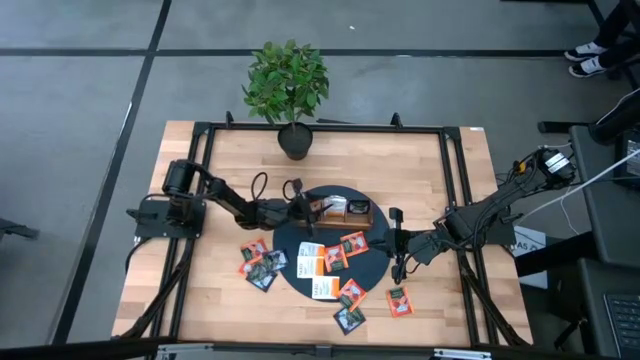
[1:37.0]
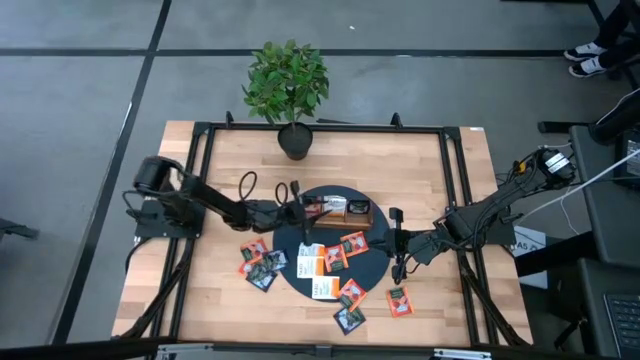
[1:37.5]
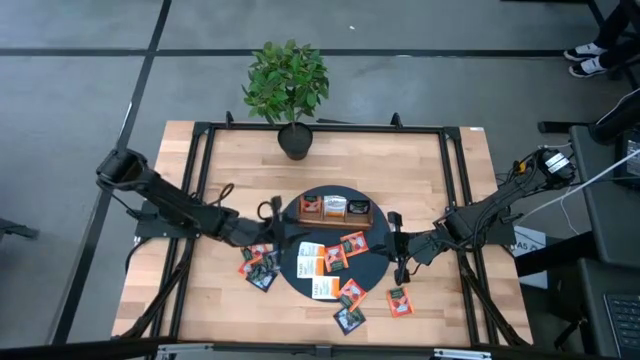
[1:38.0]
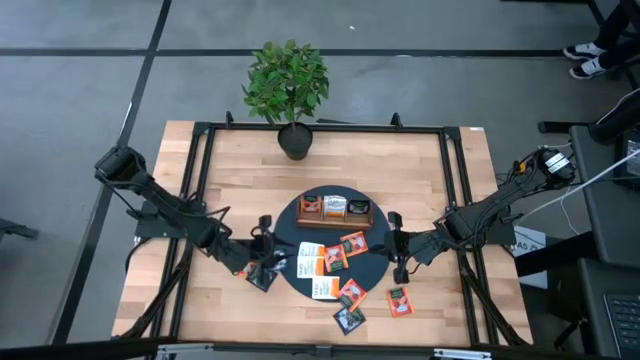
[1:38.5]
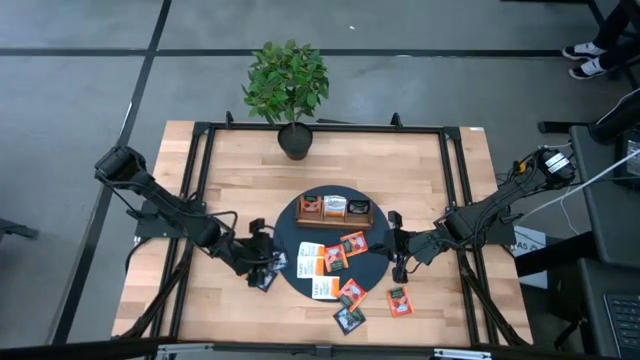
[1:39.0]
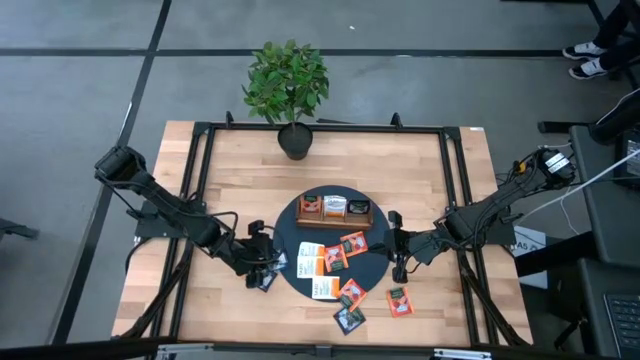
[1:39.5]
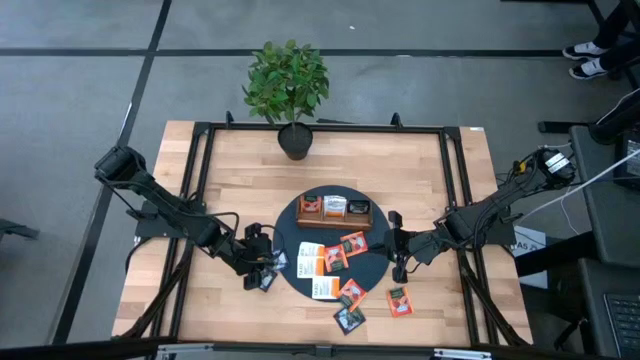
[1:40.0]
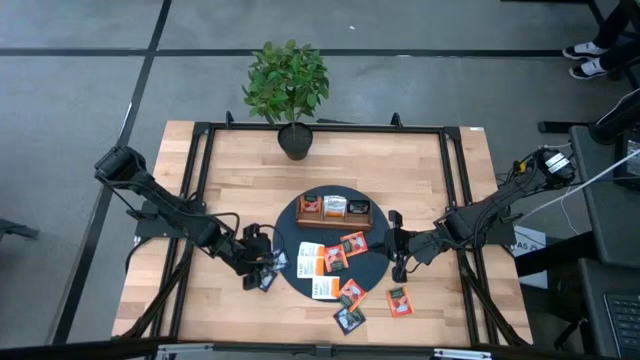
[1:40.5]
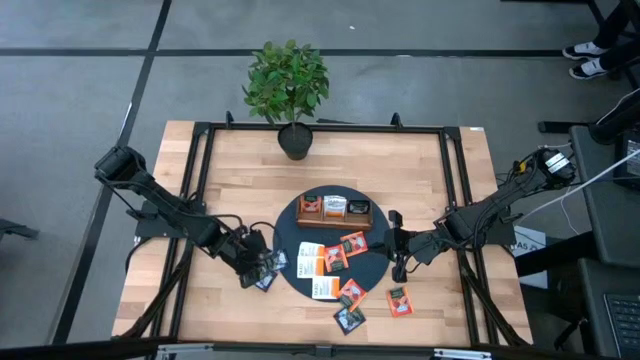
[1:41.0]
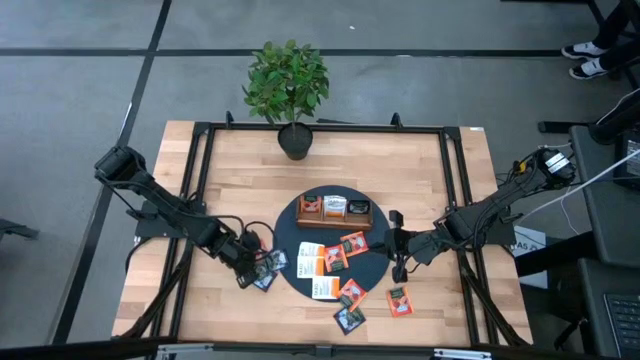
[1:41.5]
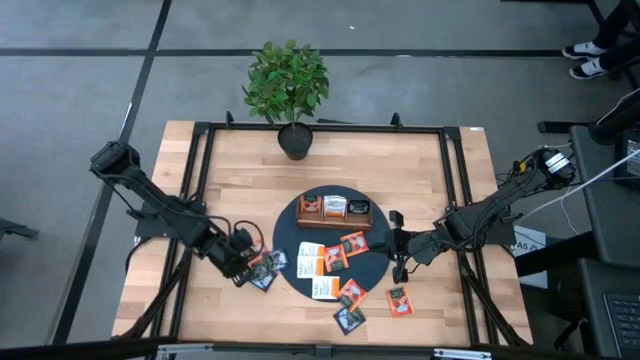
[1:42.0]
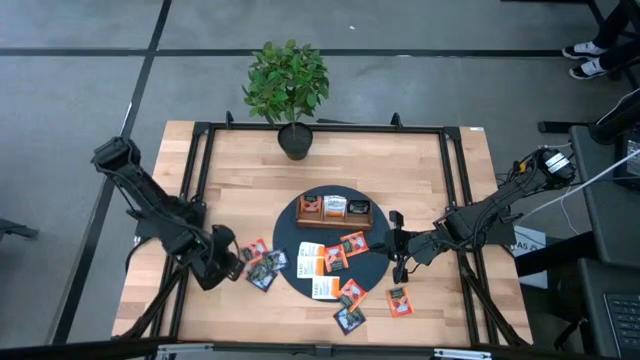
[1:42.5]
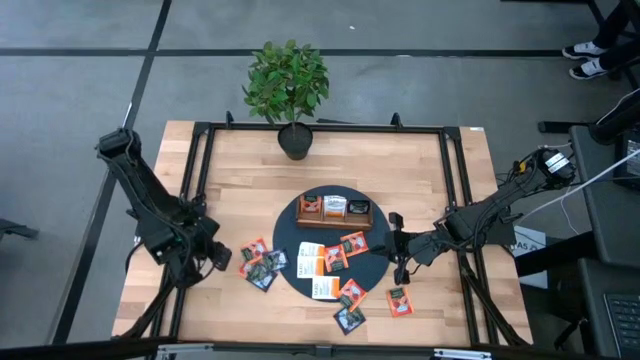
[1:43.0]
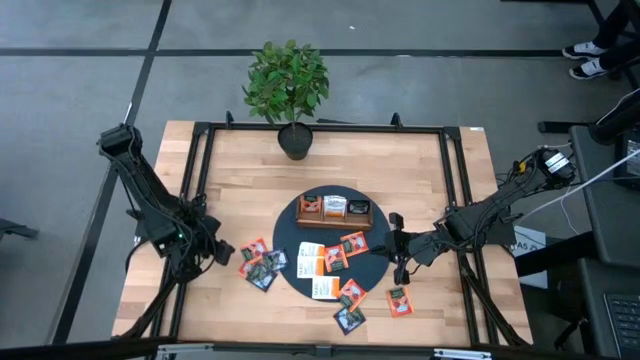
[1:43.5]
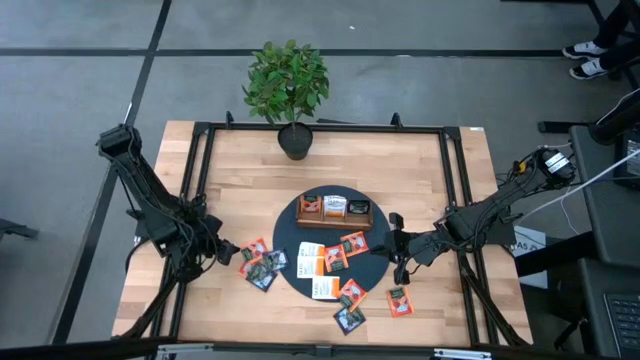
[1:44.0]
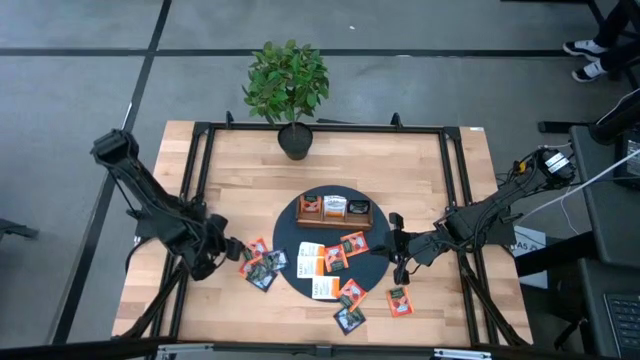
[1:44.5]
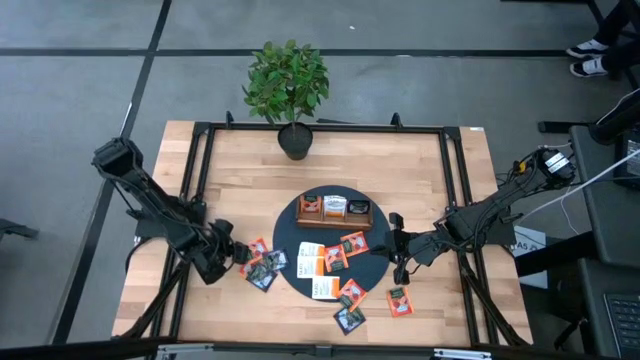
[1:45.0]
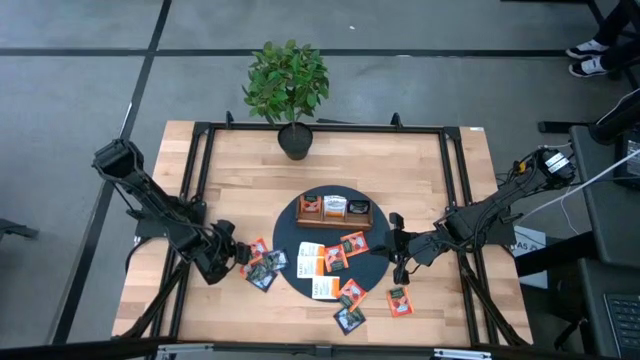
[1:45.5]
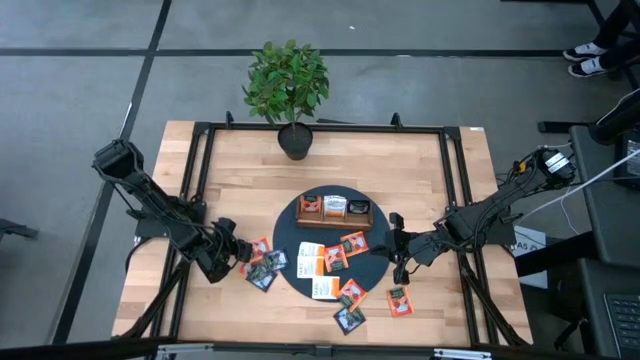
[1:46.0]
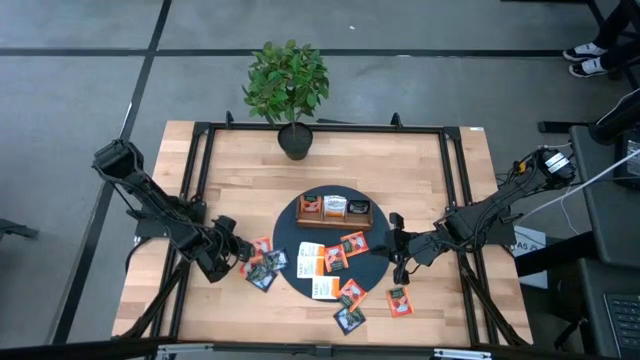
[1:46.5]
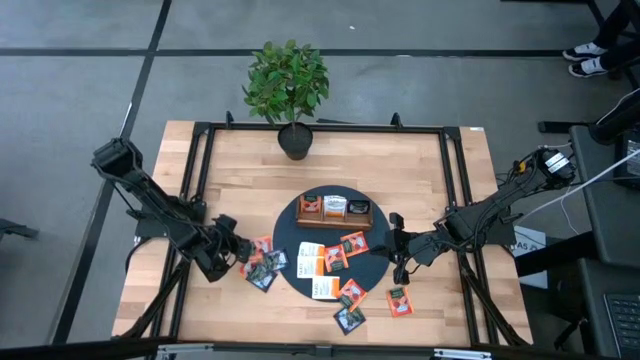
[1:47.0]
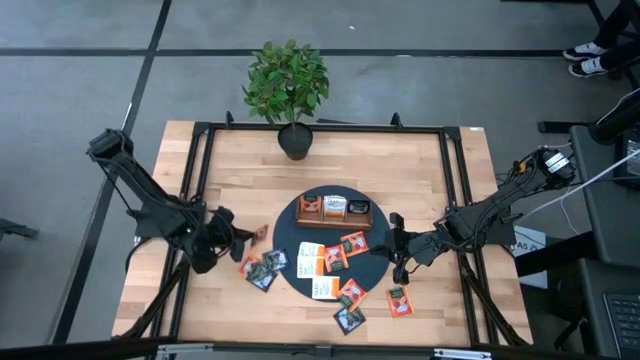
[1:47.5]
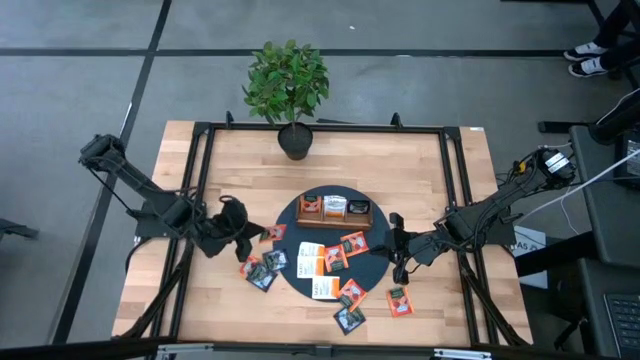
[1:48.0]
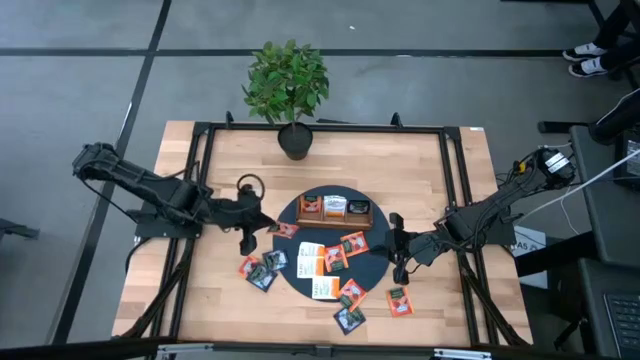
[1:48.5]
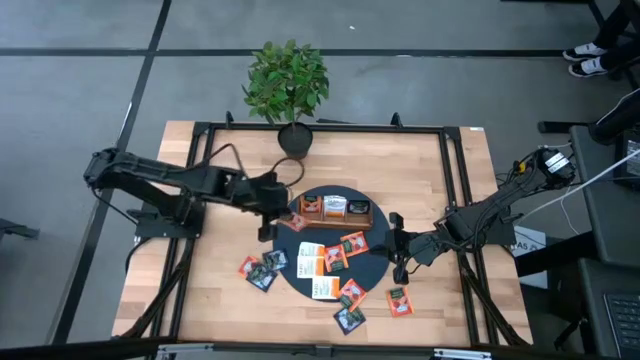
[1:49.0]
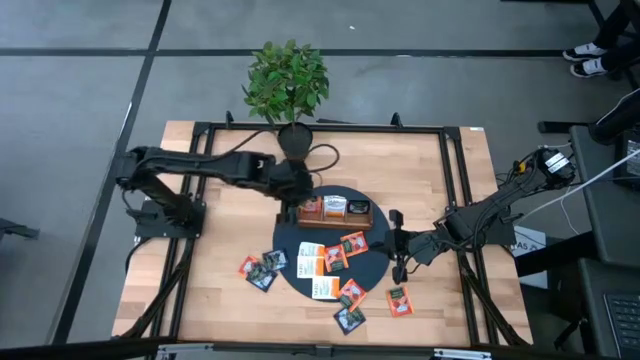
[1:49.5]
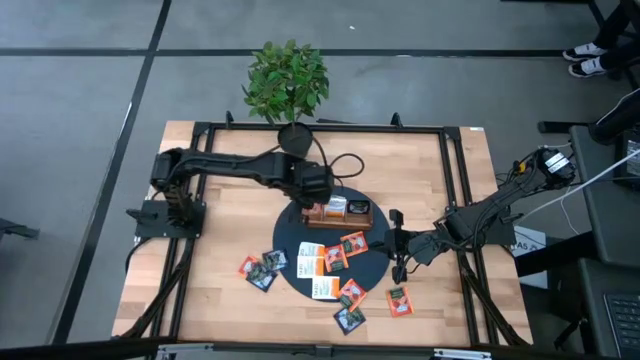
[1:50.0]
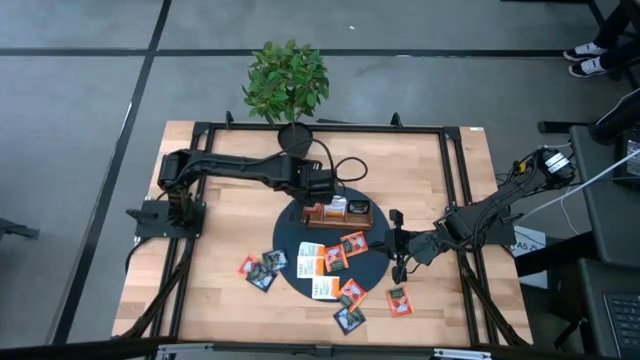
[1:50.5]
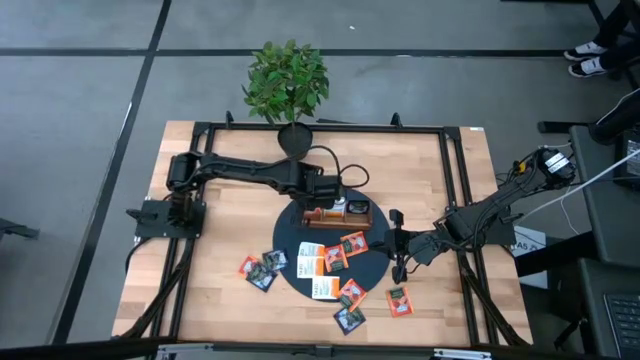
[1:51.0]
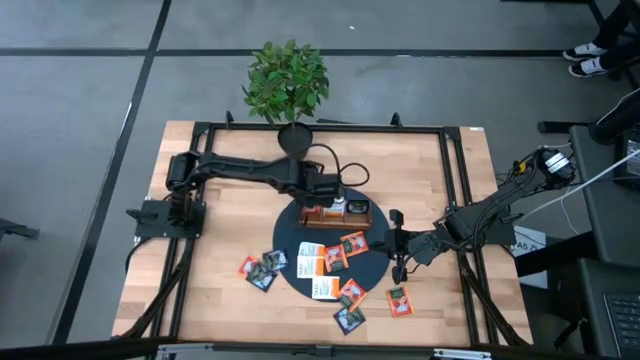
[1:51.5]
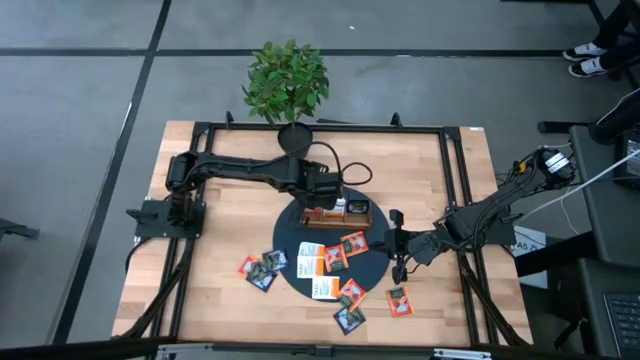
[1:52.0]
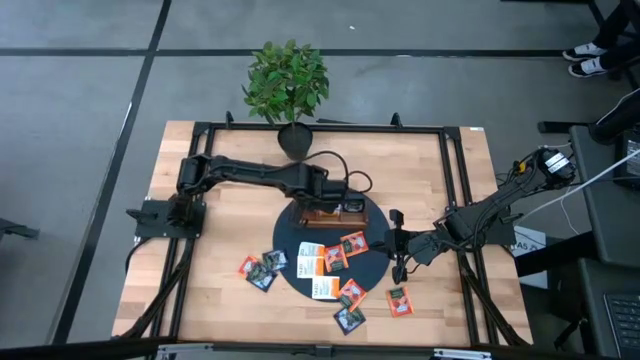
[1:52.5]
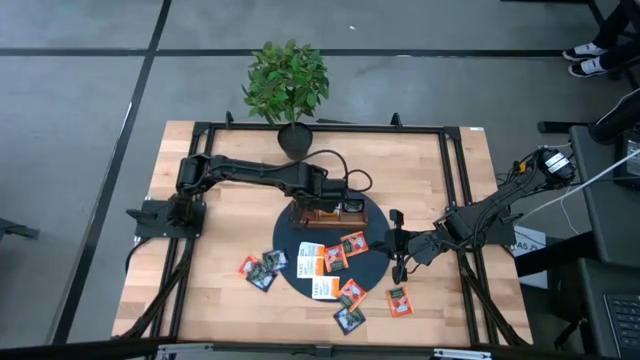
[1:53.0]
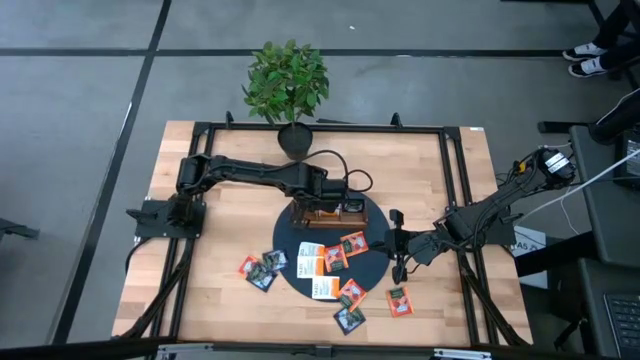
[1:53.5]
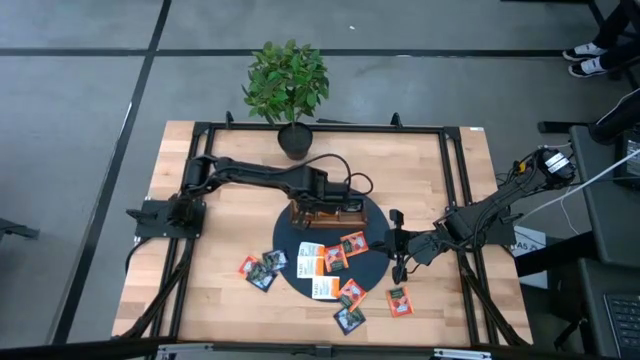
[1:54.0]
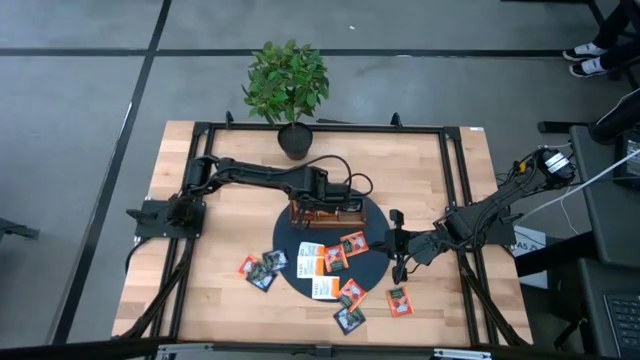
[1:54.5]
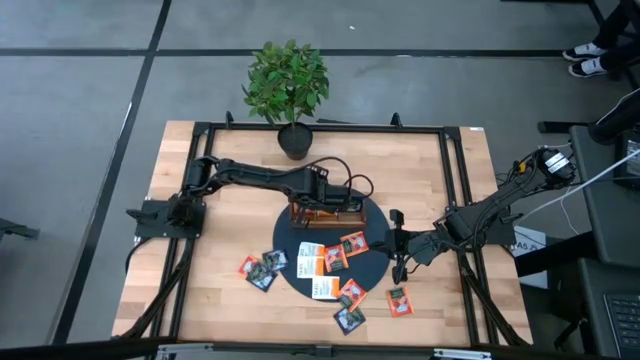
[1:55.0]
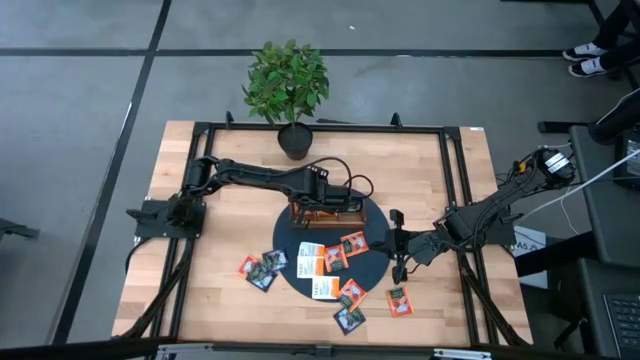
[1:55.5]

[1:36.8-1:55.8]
Task: Pick & Place Tea
Put the orange tea bag into the left side of the wooden organizer

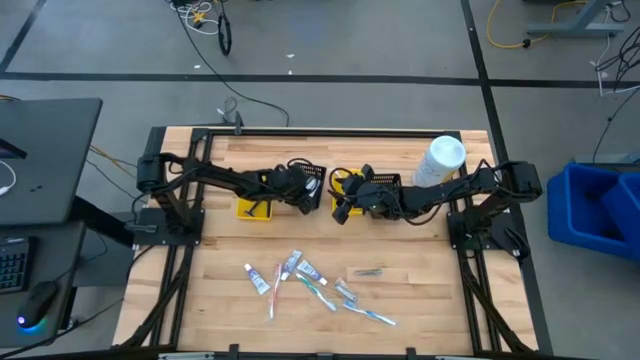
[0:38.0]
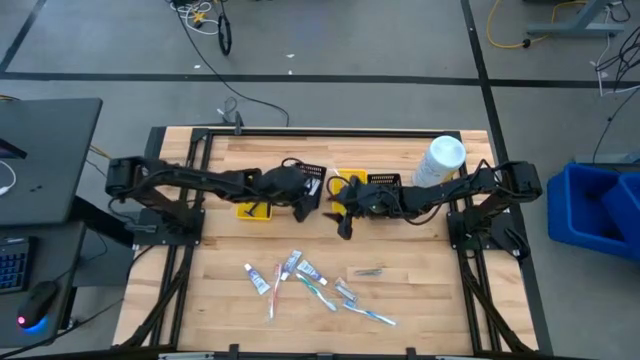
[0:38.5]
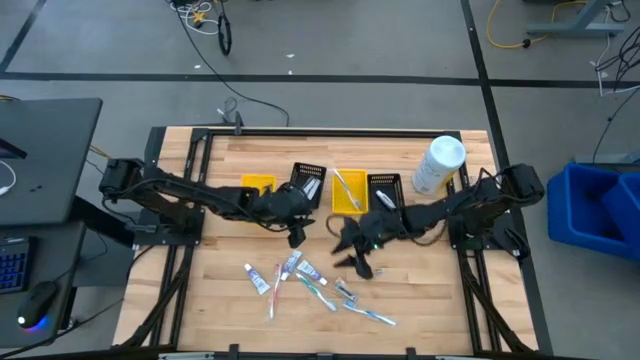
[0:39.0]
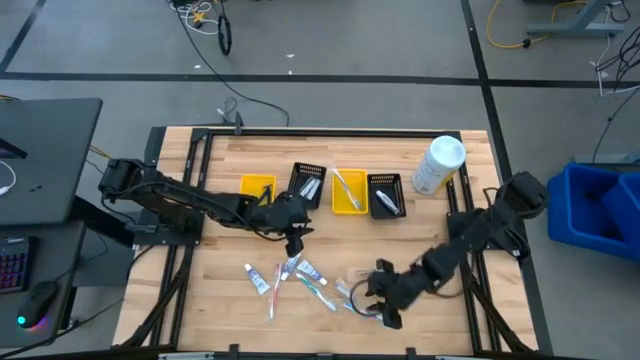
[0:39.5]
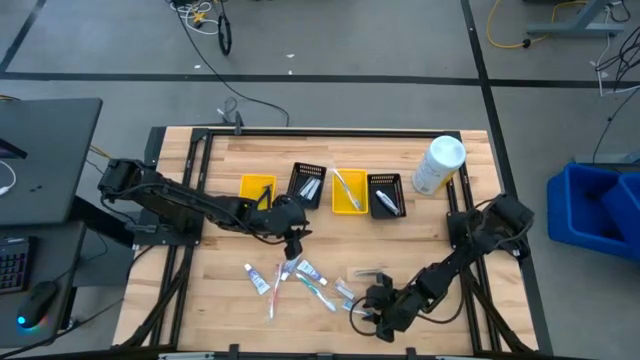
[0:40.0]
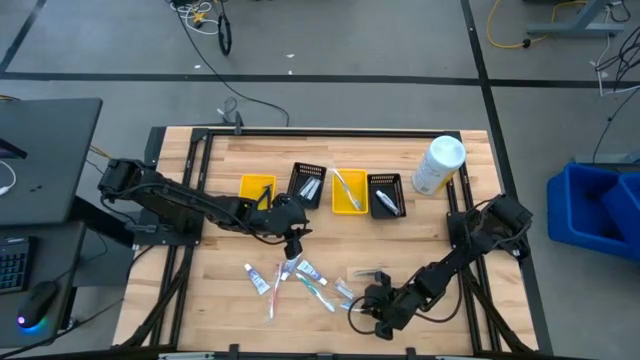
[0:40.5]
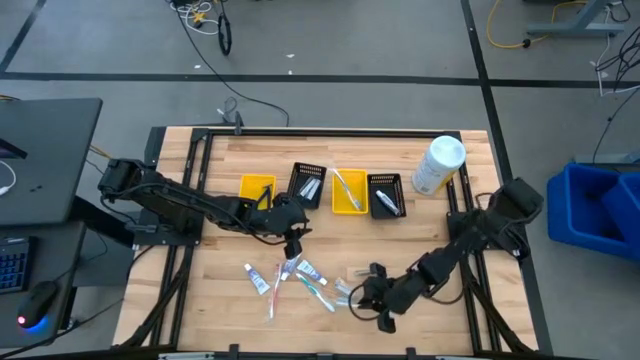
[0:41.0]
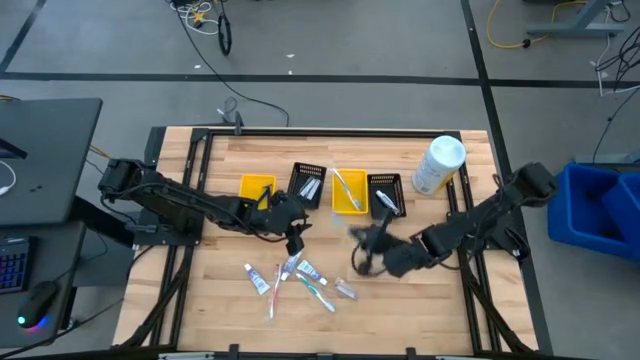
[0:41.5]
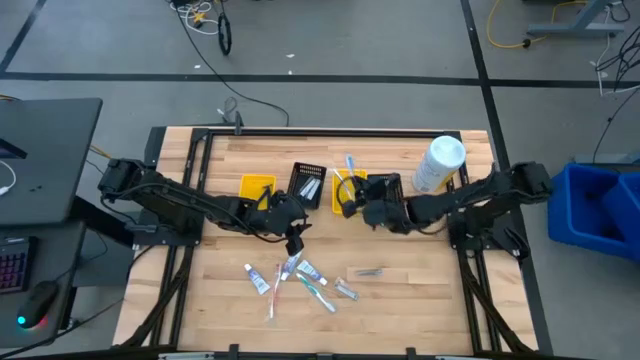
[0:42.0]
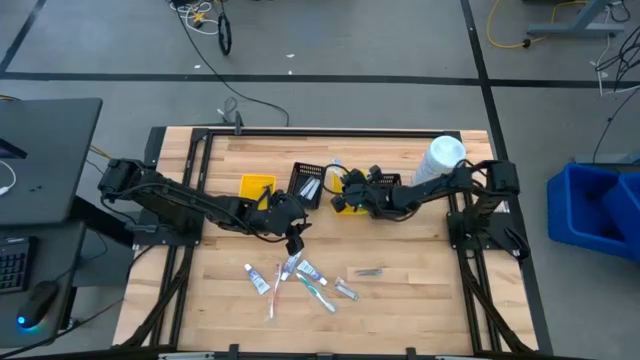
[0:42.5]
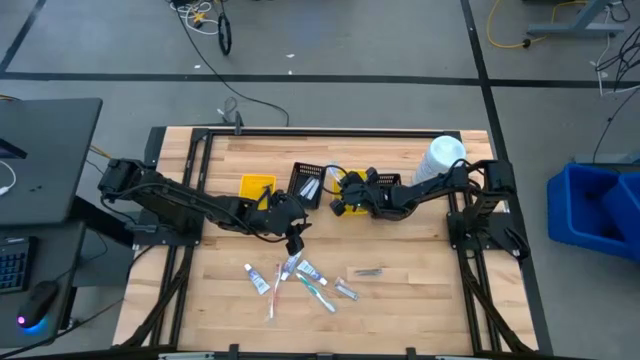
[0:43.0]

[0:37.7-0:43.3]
Task: Pick & Place Travel size toiletries
Put the blue toothbrush into the right yellow bin
